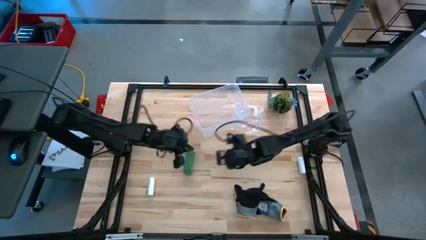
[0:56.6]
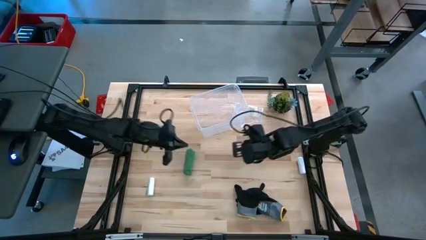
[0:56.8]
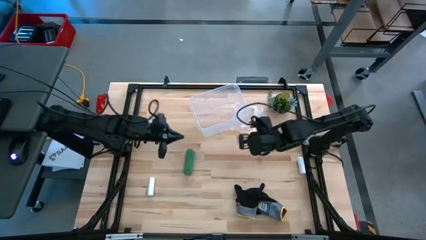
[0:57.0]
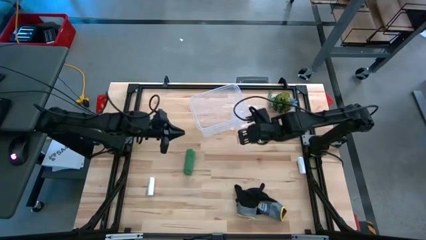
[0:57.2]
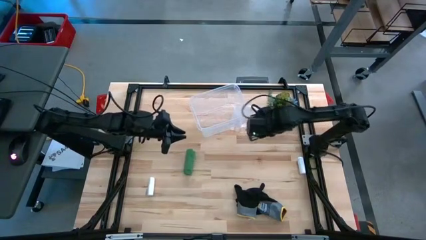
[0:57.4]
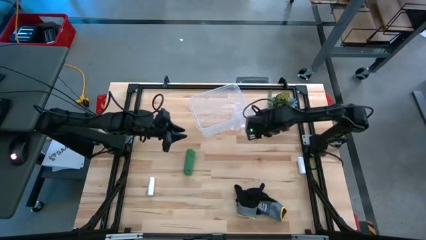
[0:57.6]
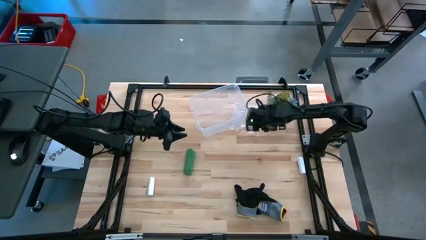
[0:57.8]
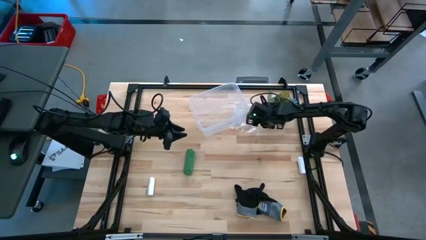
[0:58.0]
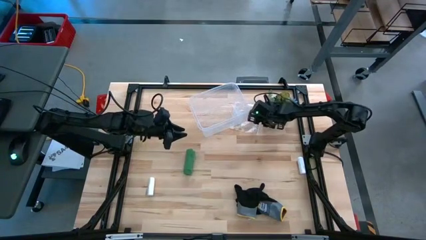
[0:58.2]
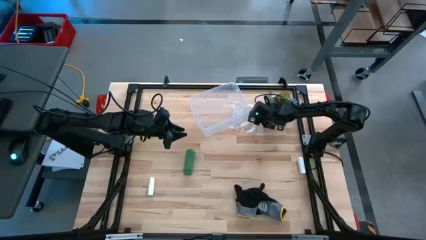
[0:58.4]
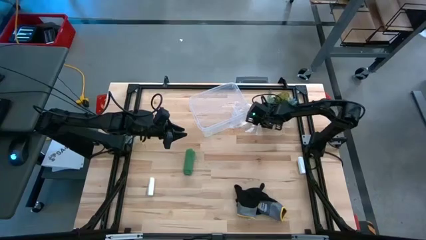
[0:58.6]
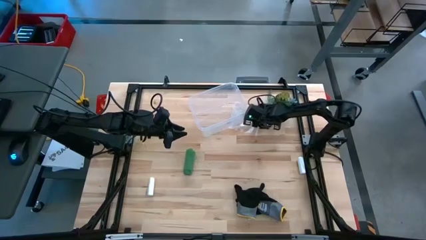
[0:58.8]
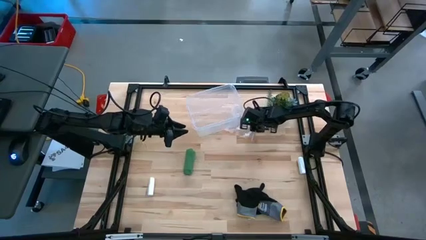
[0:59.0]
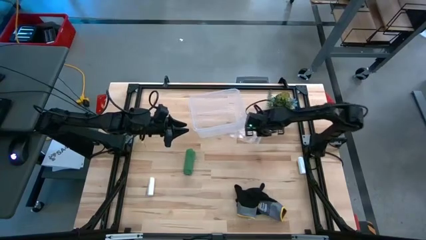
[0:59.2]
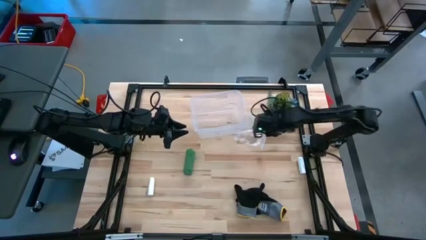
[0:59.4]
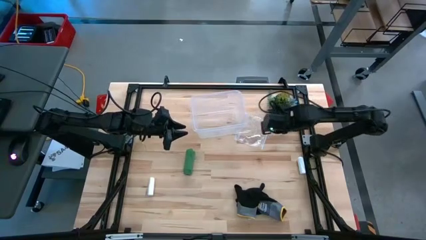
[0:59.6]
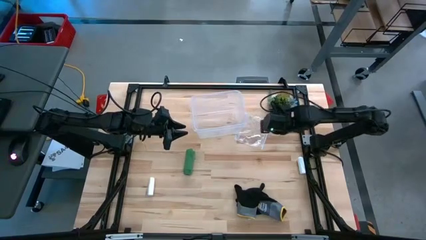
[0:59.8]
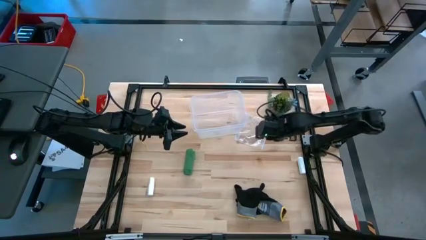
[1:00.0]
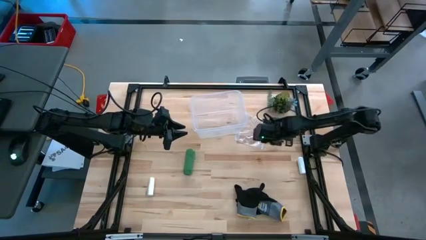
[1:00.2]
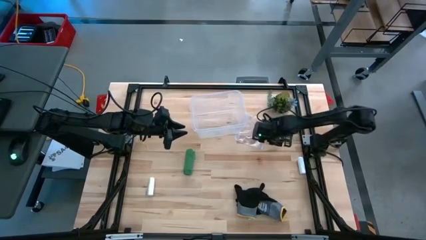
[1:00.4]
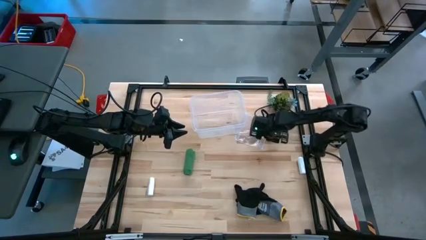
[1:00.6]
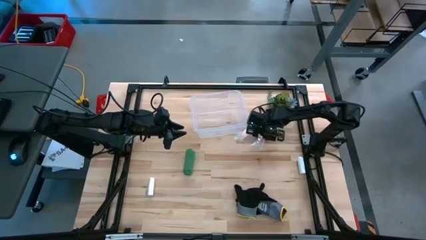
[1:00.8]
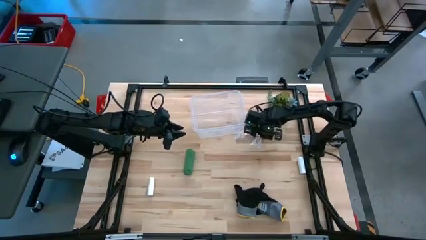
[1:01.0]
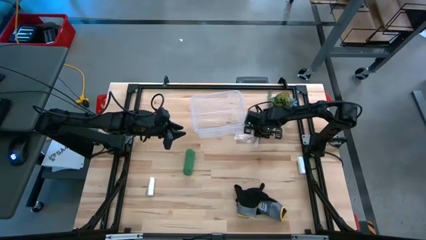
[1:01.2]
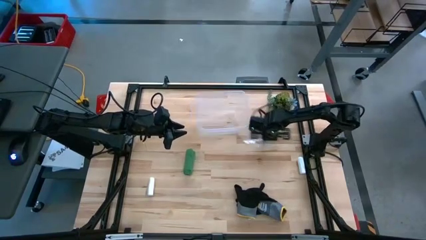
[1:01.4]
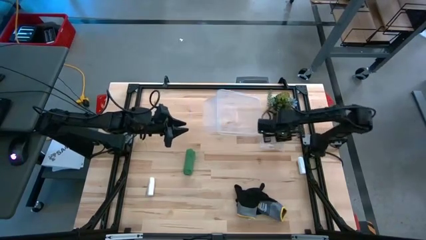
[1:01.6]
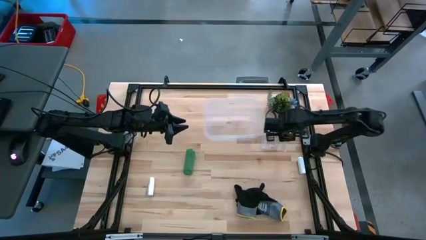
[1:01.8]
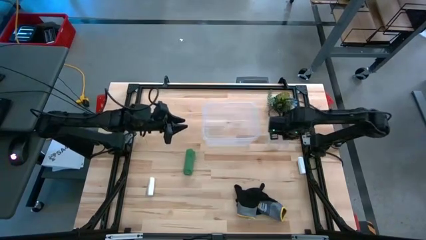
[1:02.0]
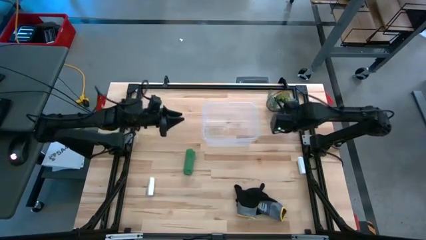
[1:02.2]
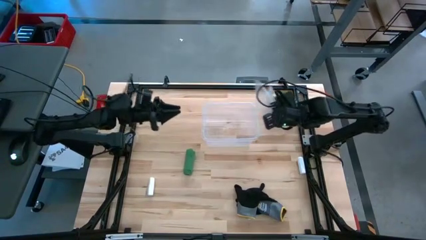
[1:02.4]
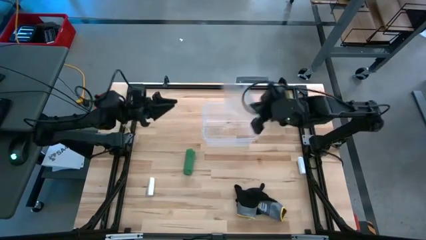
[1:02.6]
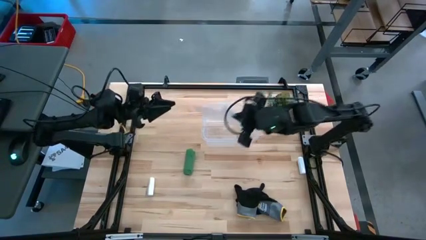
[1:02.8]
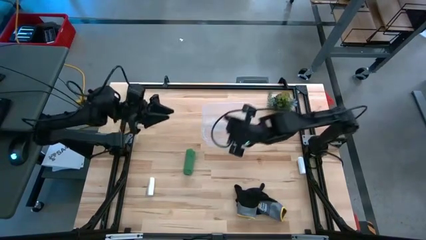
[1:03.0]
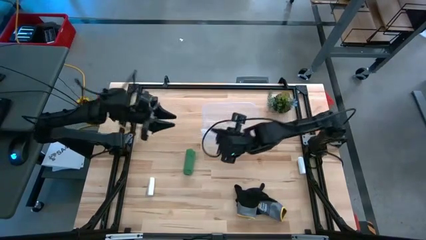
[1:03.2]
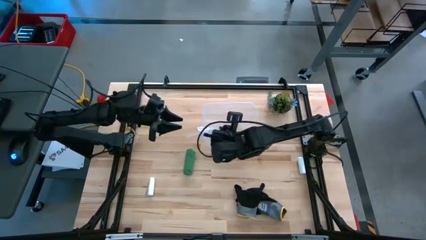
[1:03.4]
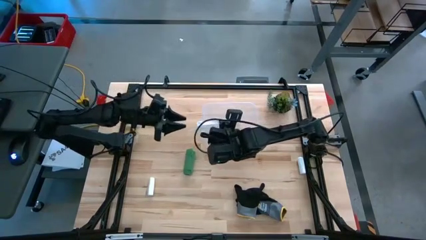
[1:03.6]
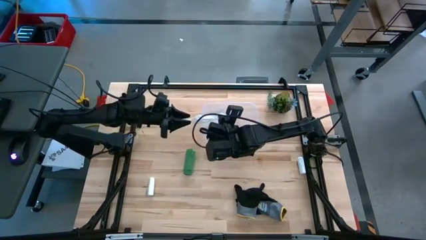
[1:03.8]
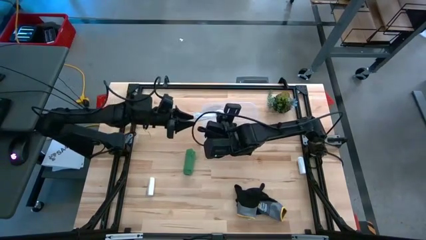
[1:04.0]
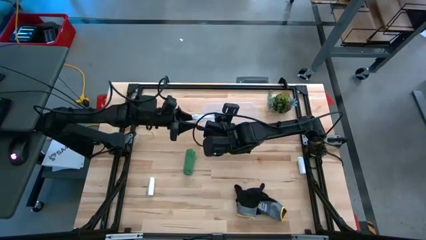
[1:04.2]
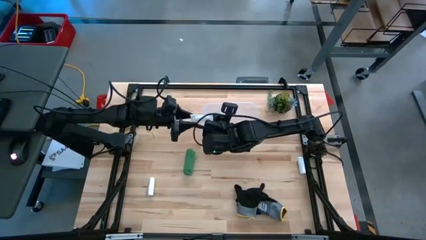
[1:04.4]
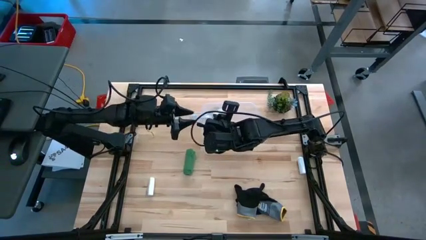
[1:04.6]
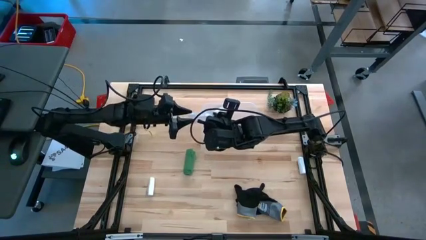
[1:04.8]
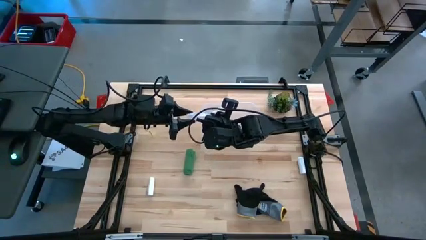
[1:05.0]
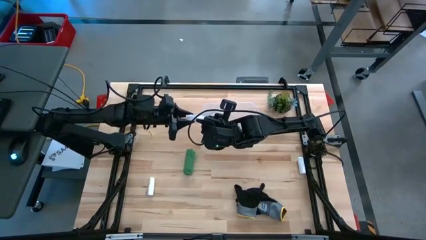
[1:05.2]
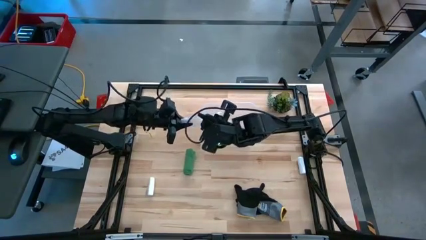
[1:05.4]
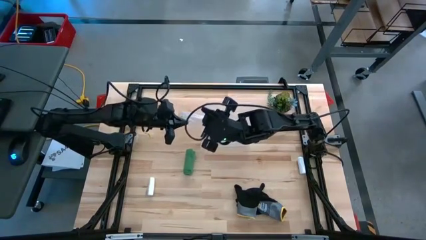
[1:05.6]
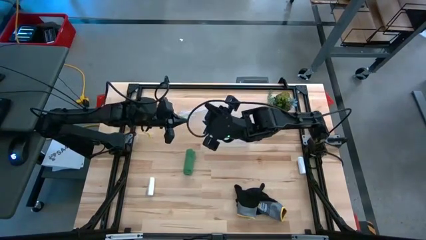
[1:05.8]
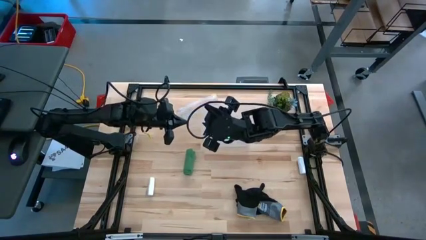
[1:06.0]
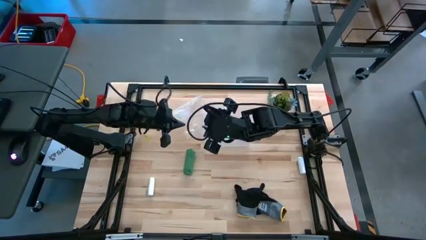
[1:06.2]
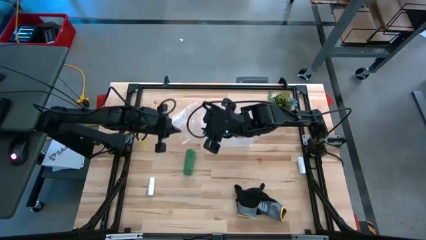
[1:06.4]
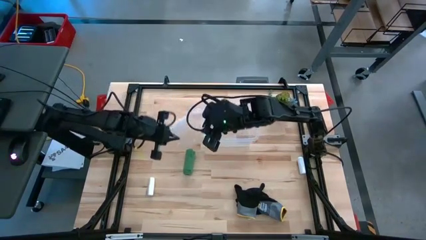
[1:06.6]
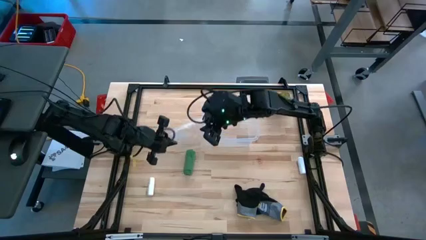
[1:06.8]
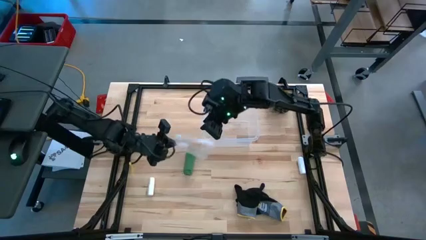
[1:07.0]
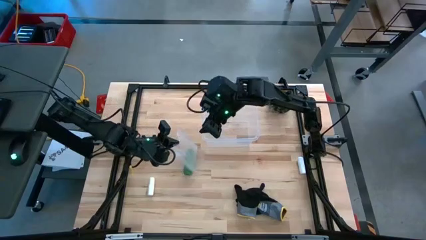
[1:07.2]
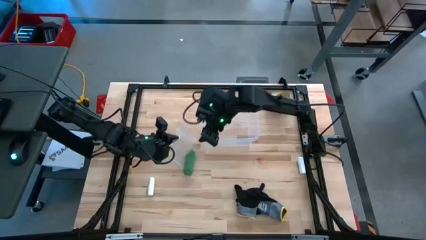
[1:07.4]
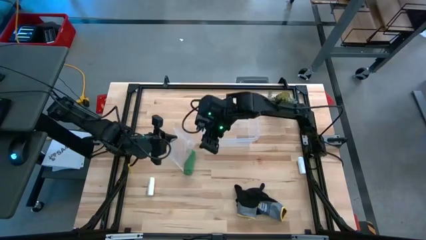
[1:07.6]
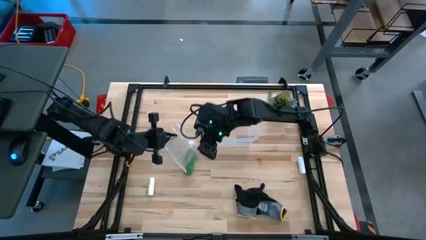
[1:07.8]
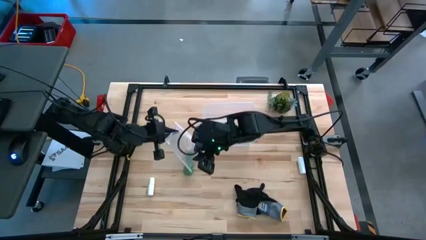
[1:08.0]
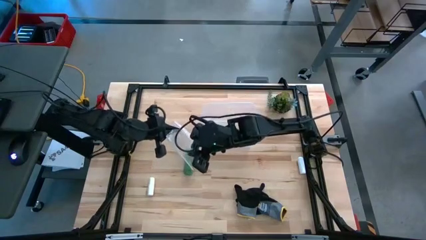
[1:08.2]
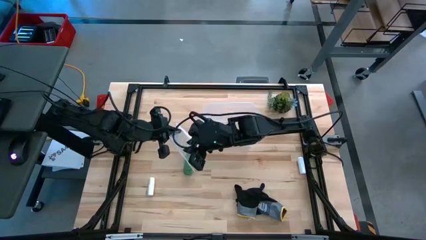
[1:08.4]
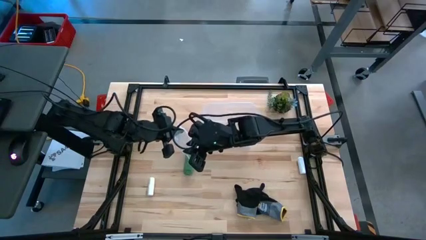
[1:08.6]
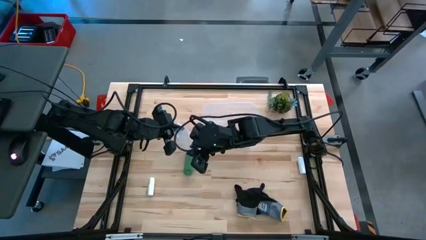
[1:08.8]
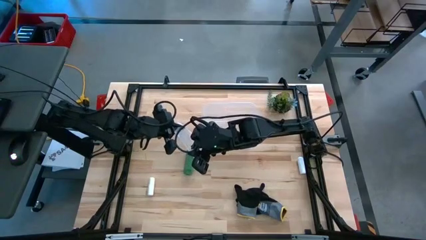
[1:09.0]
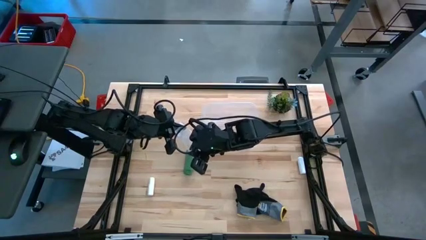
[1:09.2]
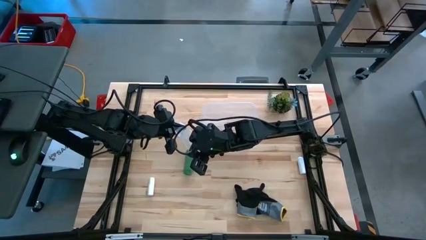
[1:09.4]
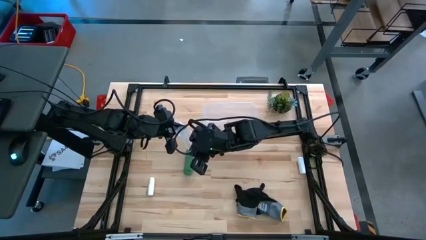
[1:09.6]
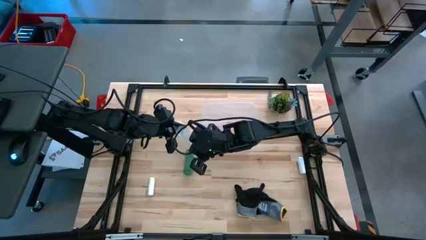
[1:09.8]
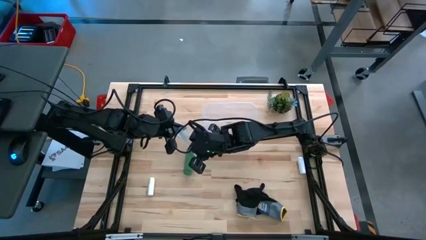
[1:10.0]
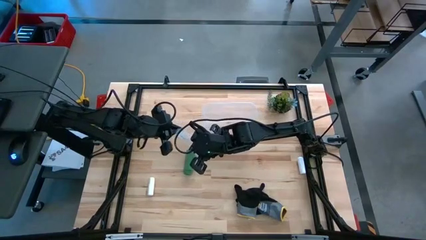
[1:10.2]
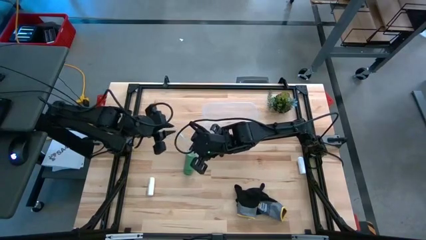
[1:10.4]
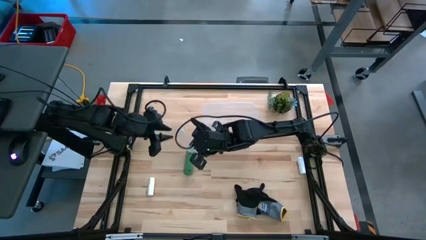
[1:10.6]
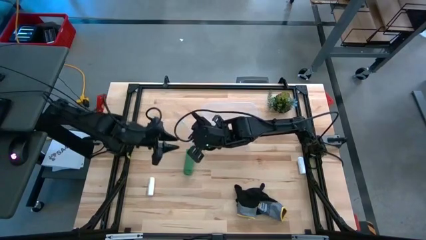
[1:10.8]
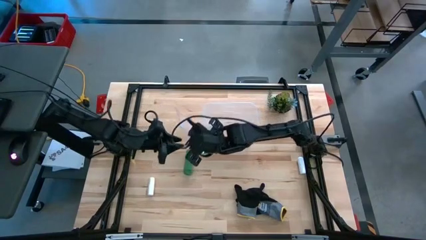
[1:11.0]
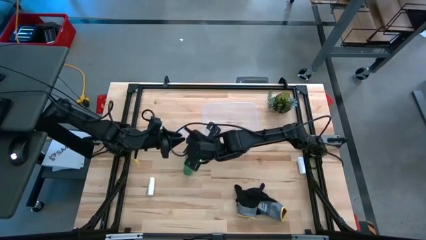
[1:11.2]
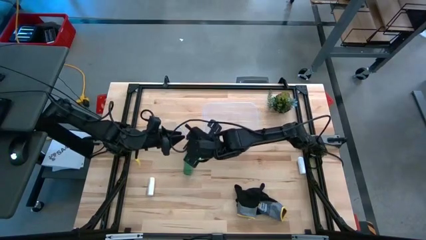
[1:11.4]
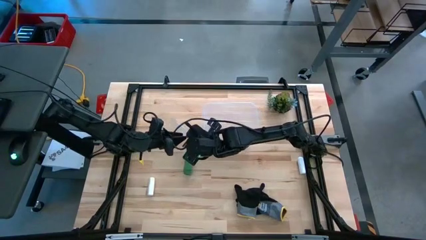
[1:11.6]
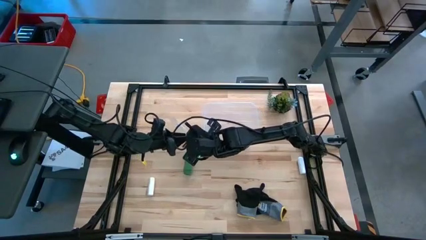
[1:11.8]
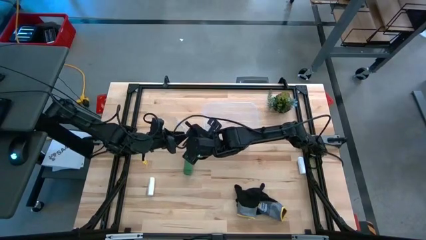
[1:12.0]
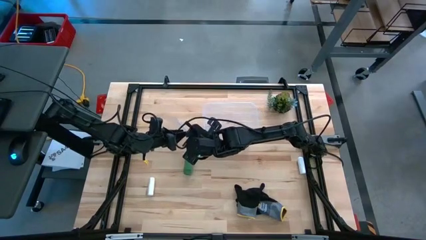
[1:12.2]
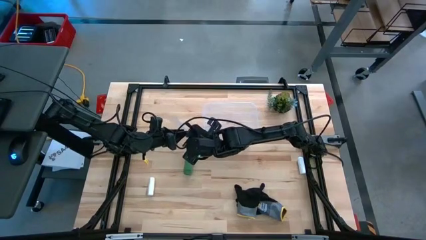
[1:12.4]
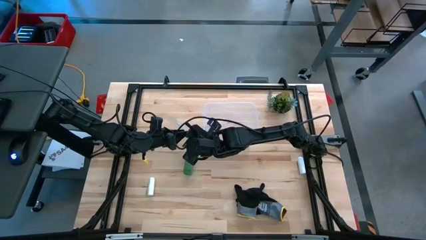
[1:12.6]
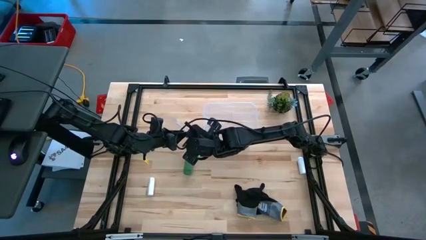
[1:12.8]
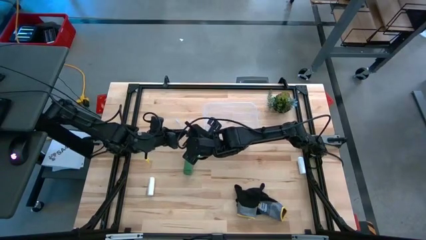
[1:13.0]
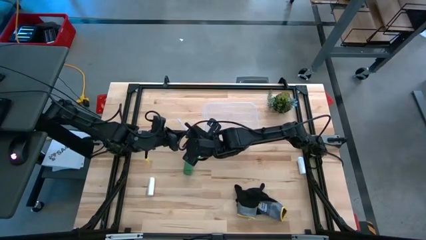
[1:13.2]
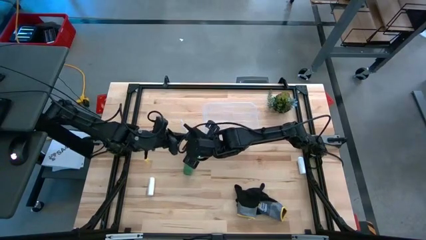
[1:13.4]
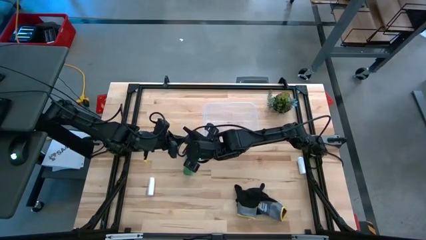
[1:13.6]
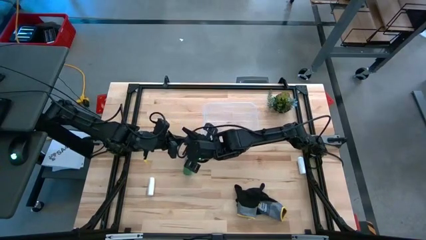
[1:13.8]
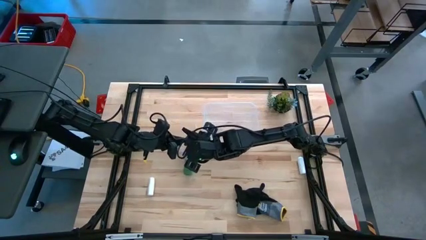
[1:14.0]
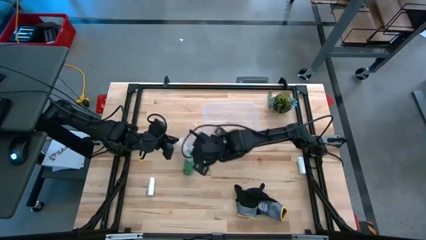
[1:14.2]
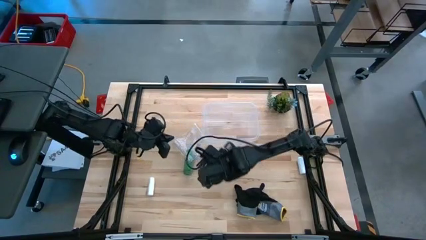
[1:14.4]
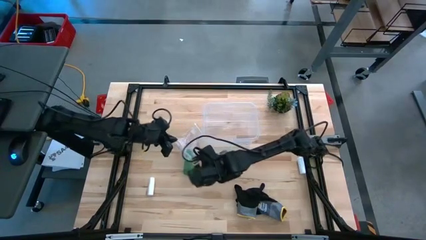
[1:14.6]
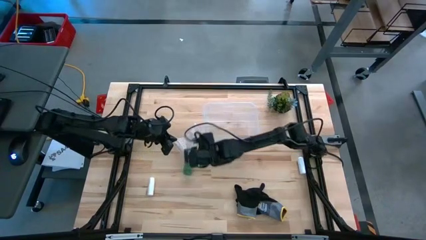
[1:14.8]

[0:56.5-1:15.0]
Task: Roll bandage
Open the transparent zip bag
